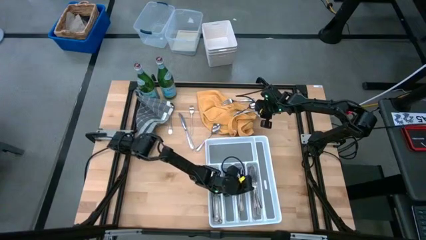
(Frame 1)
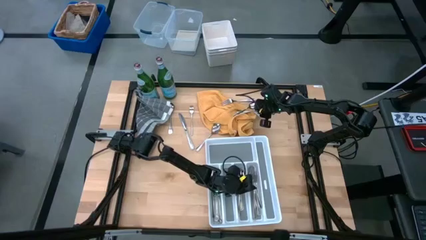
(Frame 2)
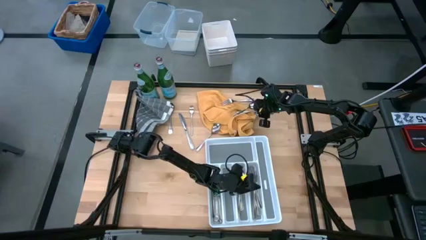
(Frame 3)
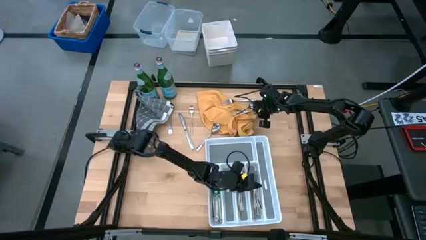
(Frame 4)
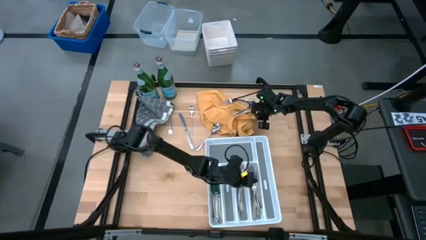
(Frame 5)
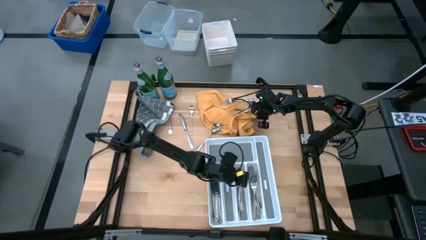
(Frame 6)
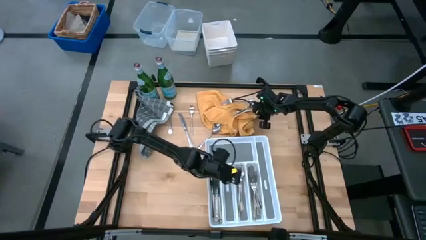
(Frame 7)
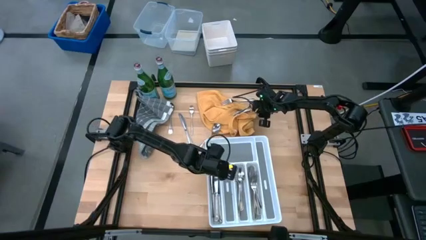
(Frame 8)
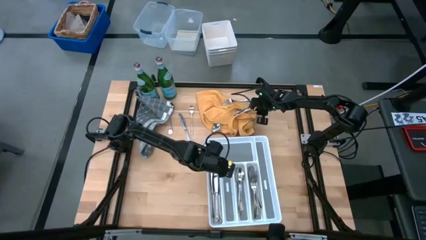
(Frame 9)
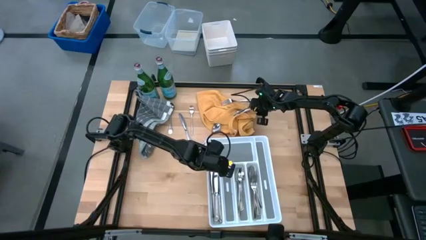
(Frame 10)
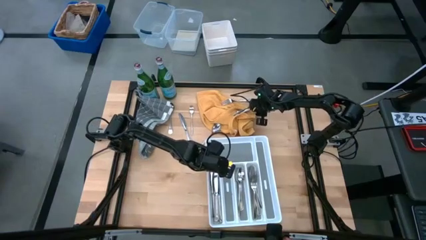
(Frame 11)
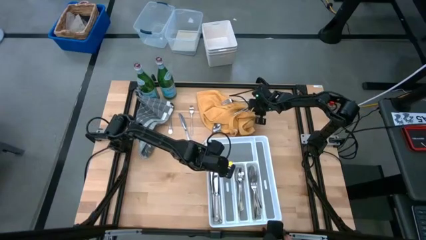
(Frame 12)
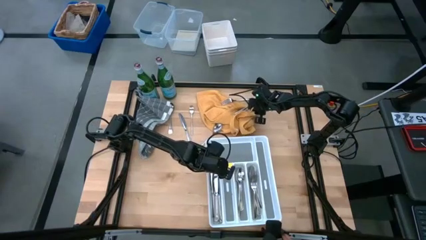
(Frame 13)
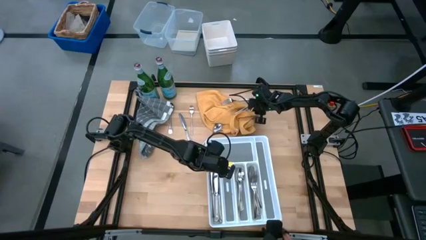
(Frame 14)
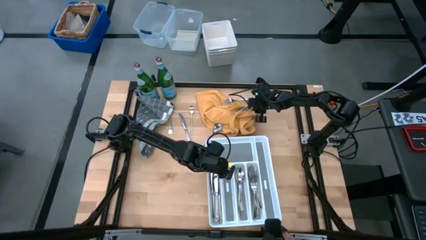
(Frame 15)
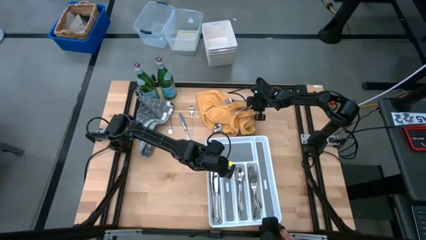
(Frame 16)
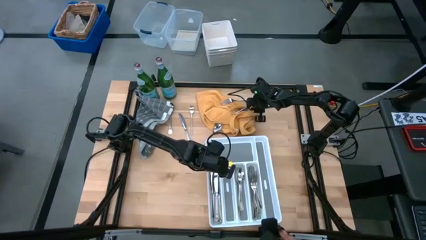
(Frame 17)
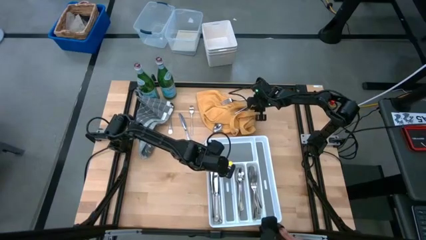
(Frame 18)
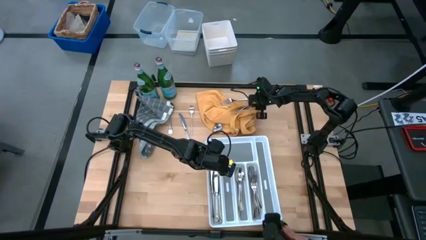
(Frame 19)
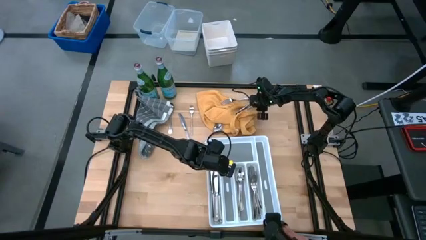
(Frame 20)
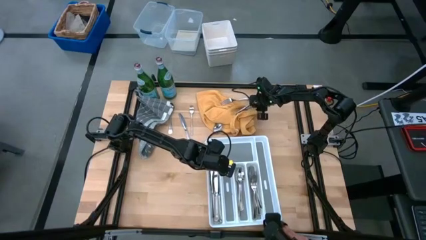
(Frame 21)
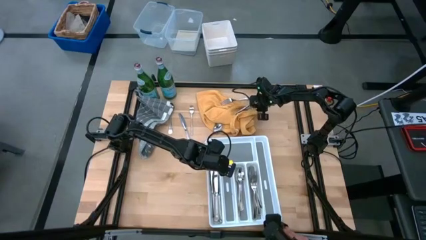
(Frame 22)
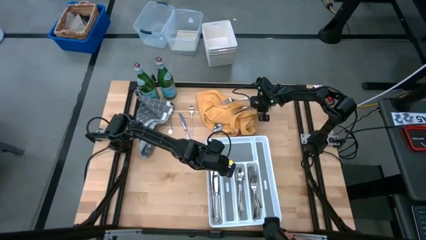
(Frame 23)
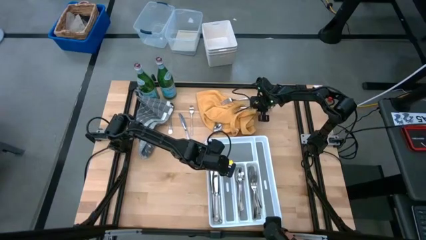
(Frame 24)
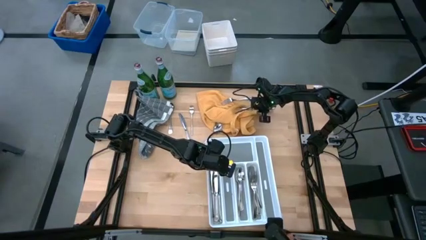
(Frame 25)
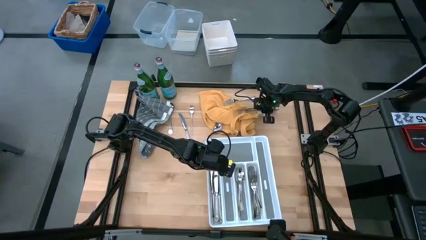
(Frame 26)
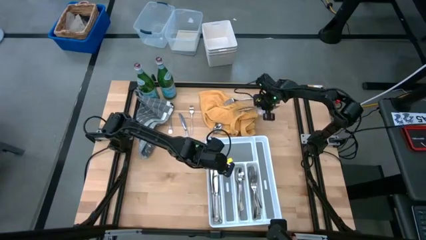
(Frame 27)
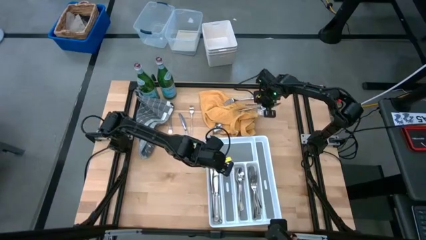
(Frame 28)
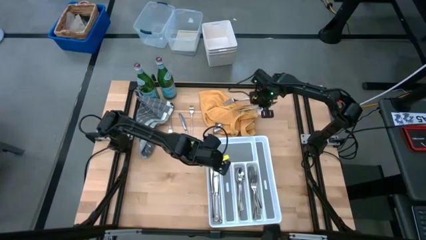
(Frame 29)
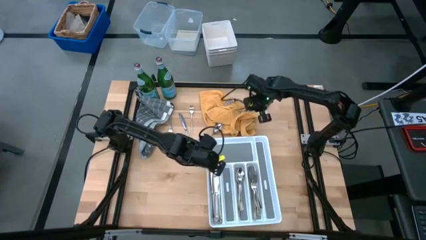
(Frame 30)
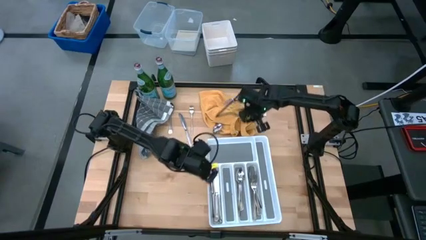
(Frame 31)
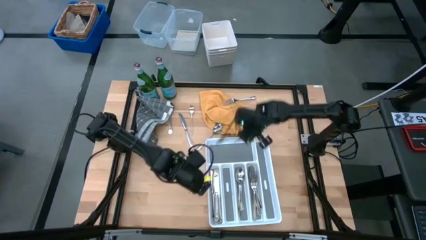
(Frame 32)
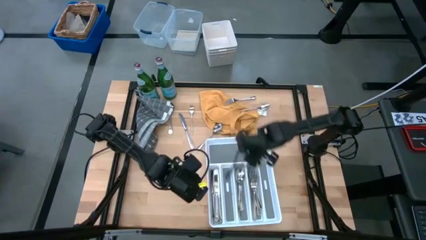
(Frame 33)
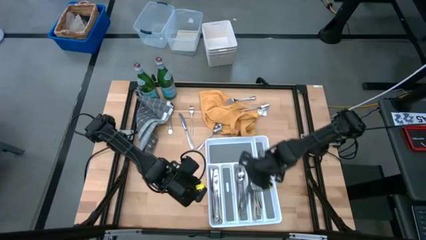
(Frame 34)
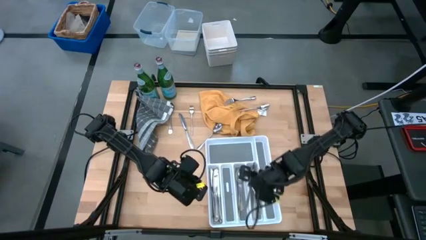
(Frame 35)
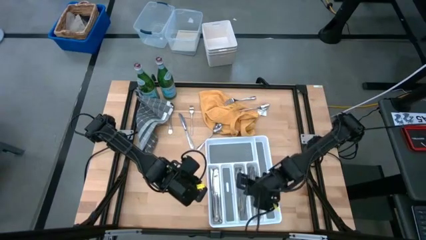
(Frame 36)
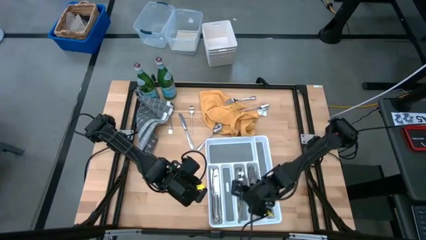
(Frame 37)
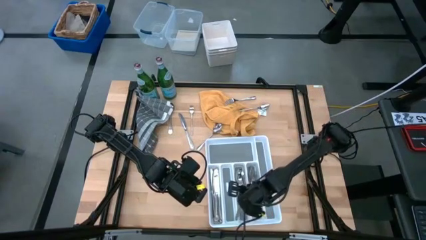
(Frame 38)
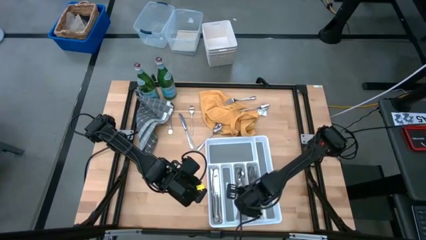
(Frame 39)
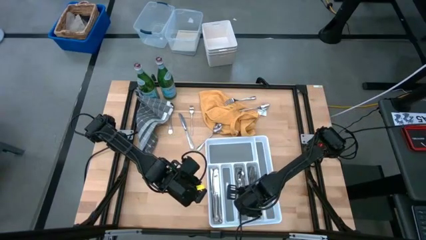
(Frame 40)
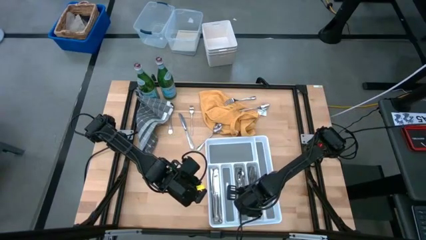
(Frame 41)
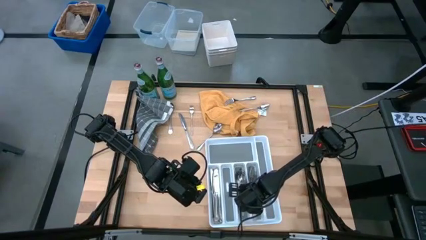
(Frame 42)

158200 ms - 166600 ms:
Task: Sort silverware
Put the spoon into the silverware tray

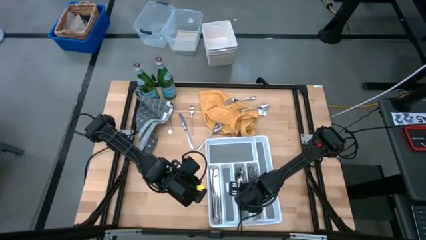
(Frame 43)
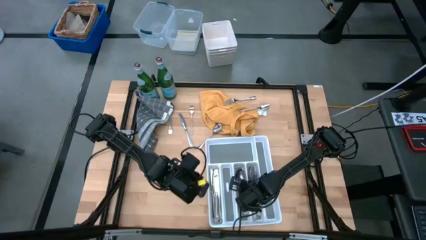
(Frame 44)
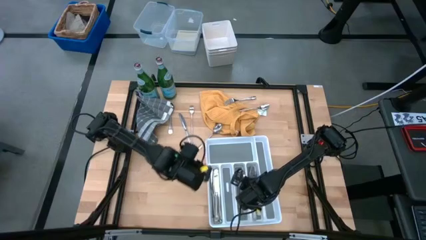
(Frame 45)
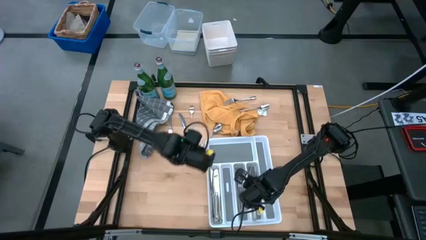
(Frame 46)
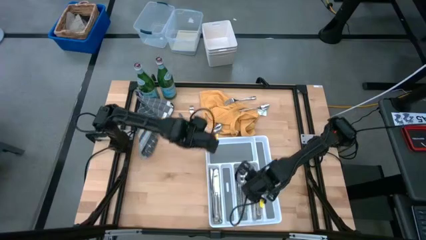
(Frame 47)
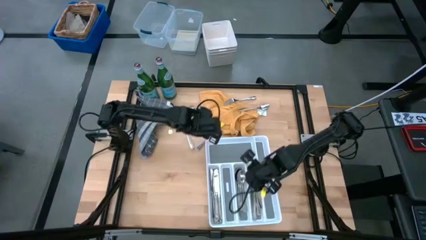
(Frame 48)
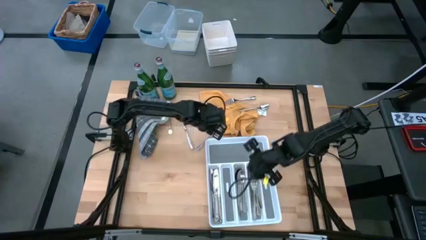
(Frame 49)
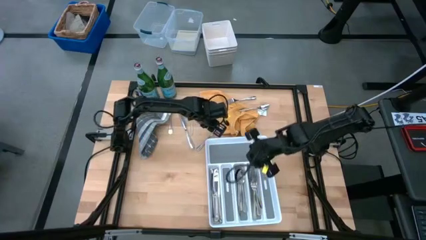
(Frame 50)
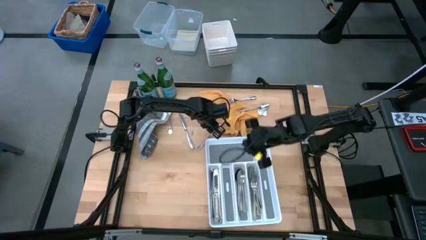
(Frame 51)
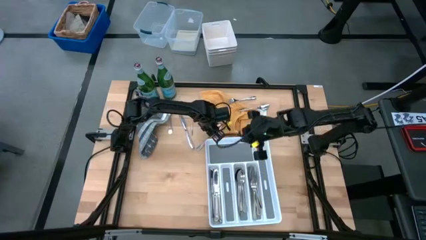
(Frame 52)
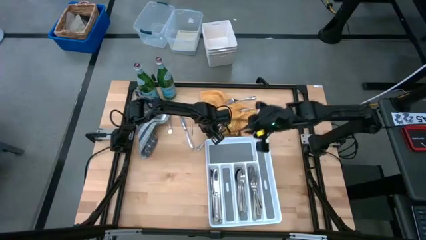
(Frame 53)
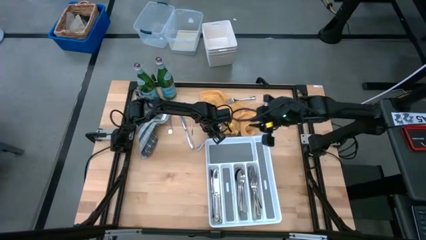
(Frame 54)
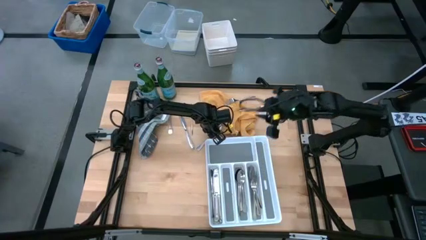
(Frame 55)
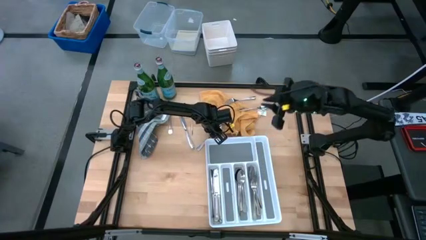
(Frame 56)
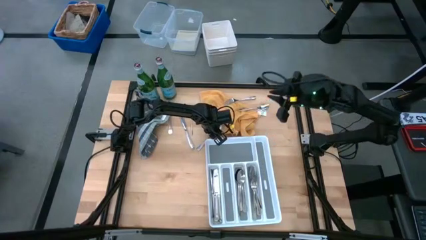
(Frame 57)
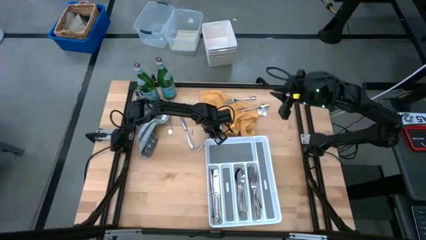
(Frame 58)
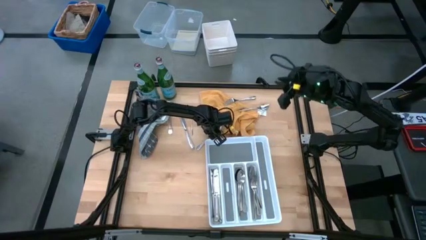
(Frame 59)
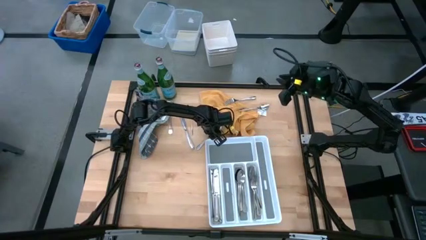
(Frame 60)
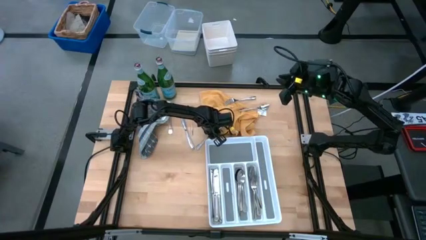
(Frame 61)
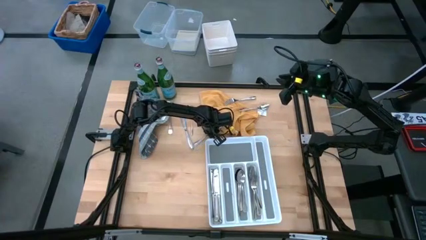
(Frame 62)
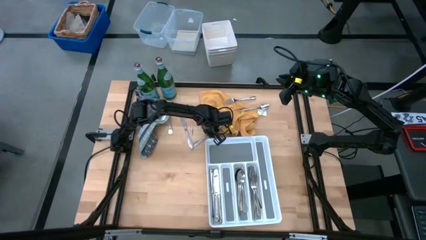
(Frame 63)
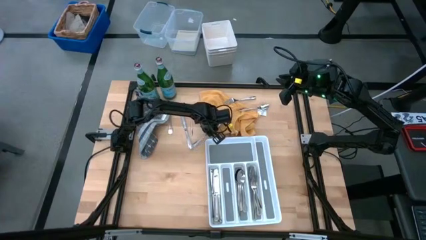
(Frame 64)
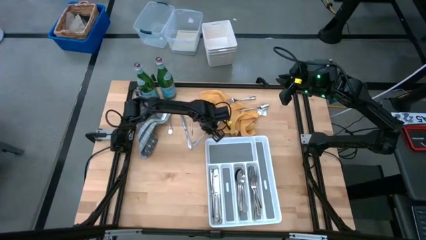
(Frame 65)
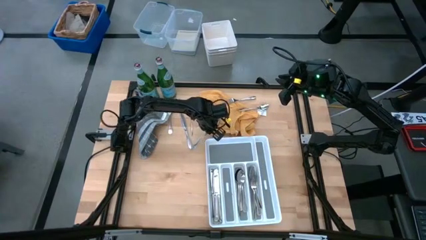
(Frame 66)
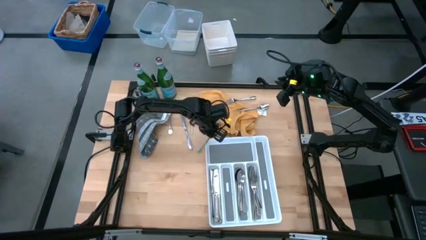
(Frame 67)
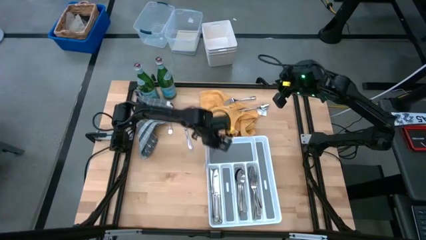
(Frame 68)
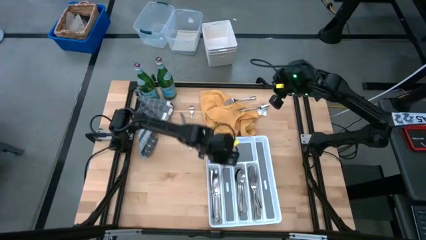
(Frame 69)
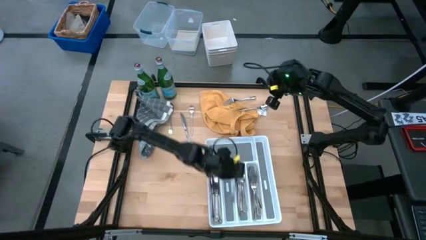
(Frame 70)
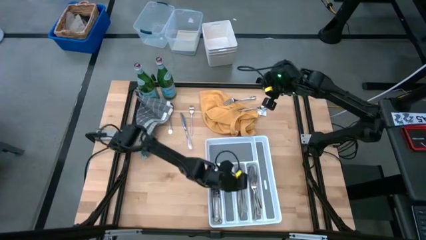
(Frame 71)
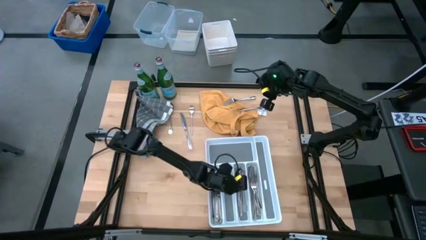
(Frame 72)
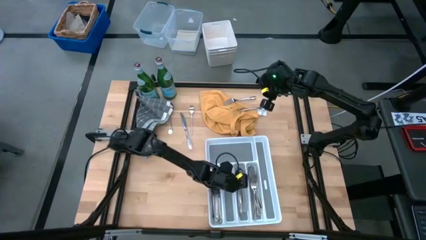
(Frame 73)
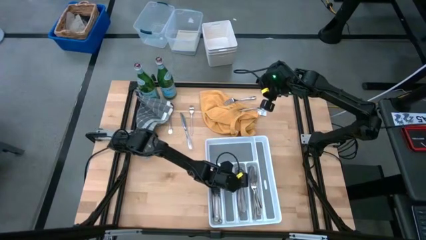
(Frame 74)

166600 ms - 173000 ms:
Put the spoon into the silverware tray
